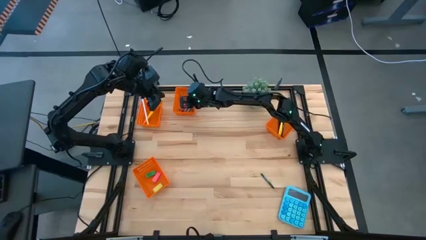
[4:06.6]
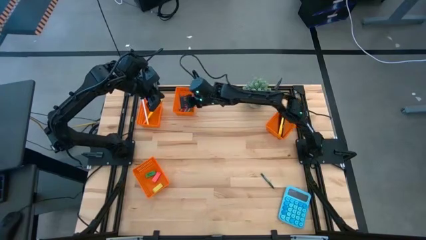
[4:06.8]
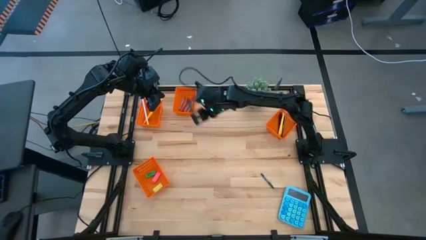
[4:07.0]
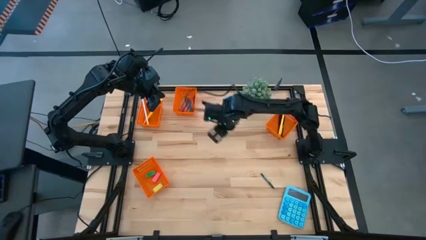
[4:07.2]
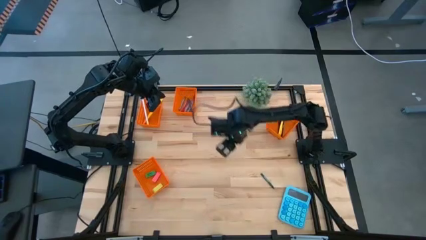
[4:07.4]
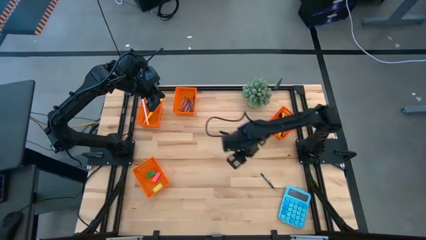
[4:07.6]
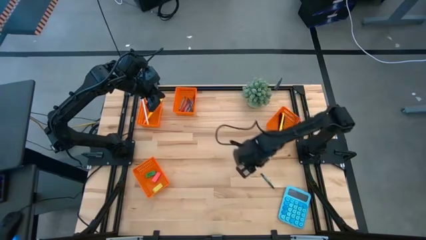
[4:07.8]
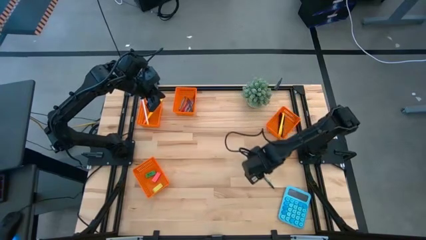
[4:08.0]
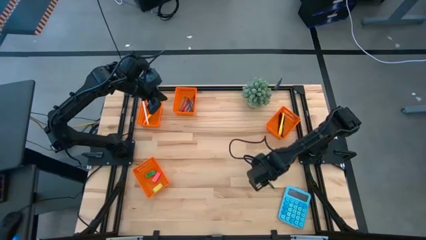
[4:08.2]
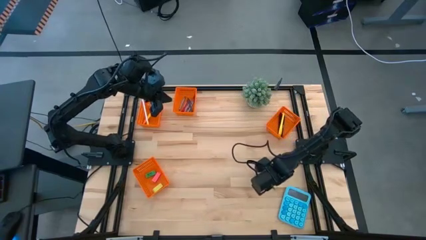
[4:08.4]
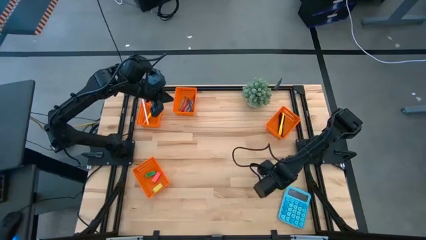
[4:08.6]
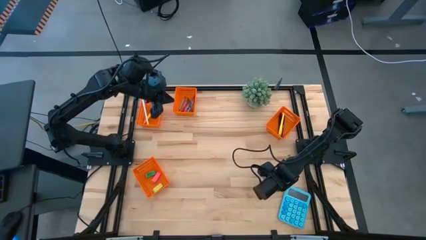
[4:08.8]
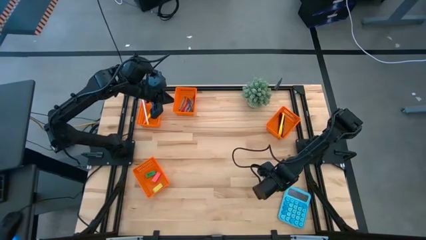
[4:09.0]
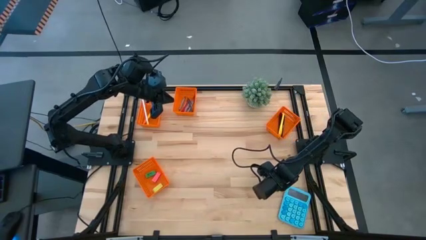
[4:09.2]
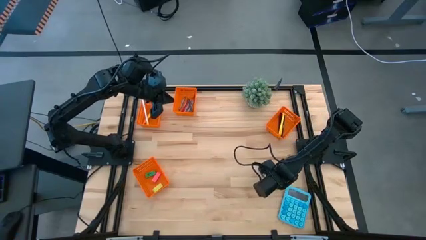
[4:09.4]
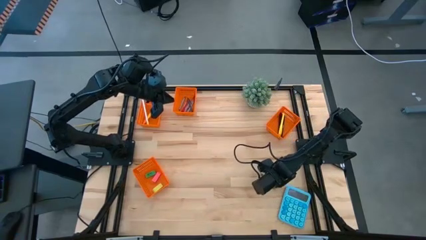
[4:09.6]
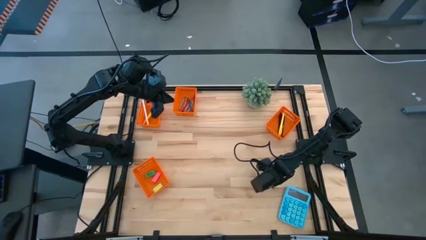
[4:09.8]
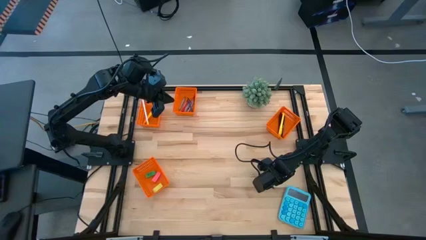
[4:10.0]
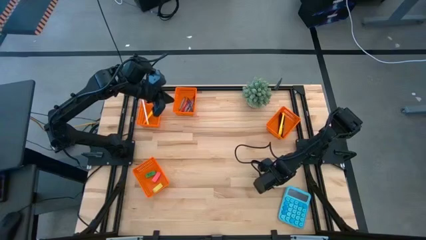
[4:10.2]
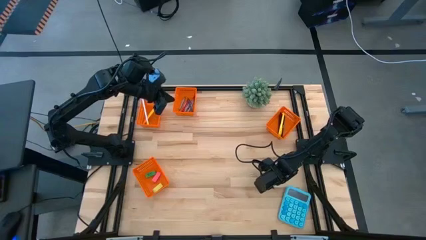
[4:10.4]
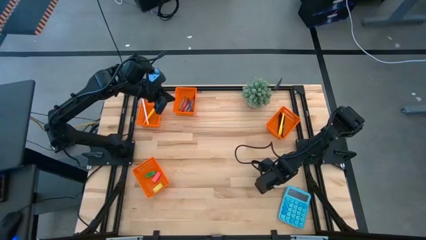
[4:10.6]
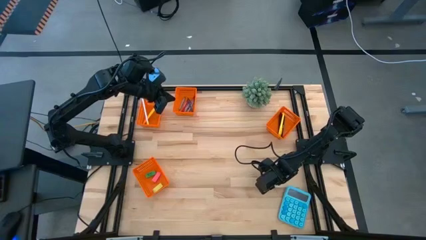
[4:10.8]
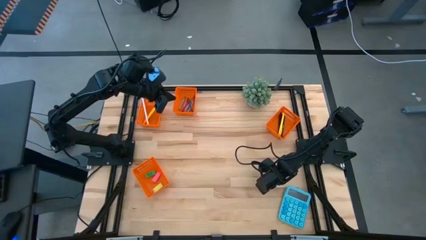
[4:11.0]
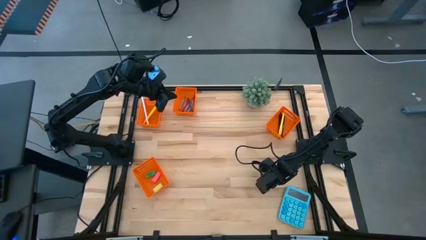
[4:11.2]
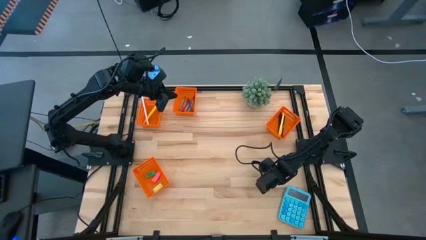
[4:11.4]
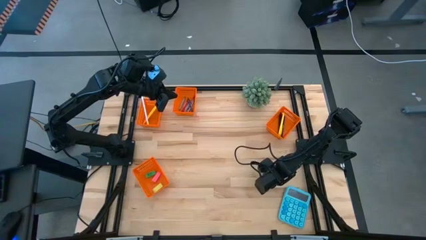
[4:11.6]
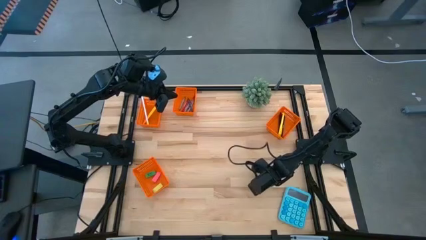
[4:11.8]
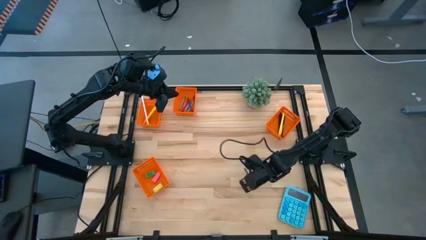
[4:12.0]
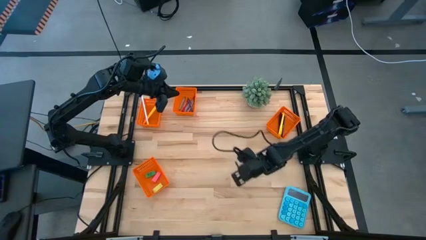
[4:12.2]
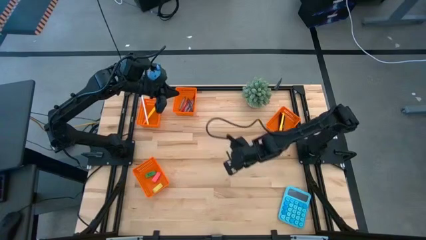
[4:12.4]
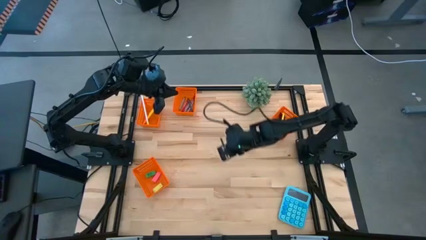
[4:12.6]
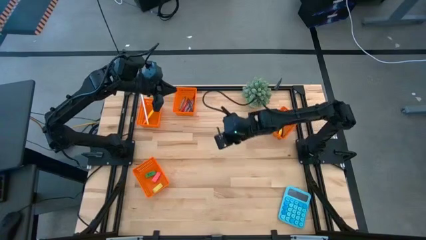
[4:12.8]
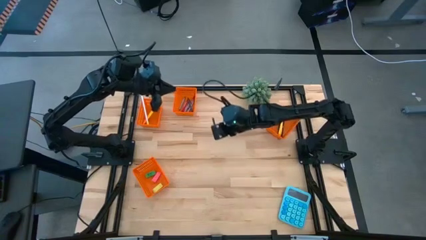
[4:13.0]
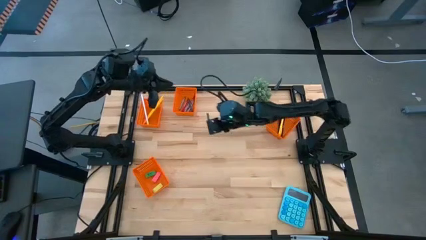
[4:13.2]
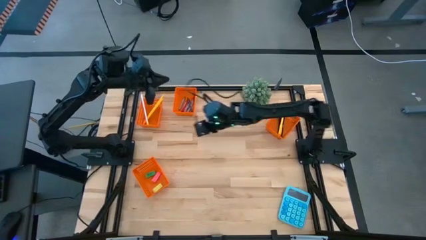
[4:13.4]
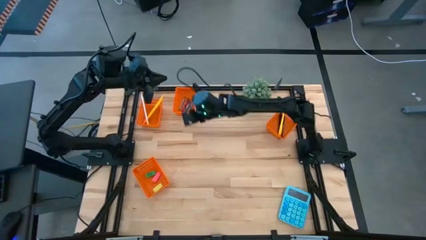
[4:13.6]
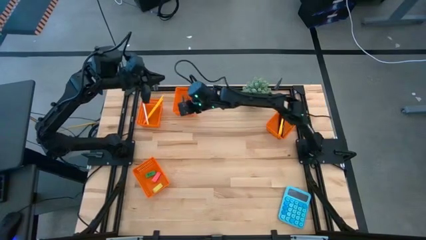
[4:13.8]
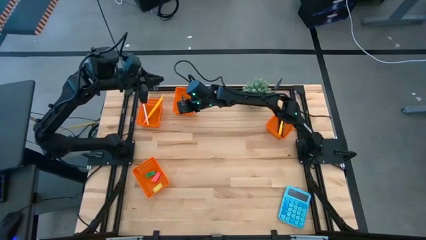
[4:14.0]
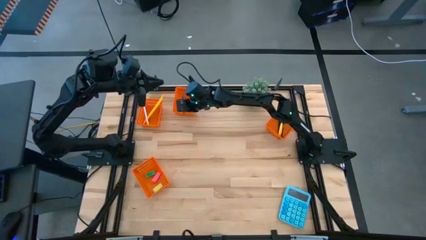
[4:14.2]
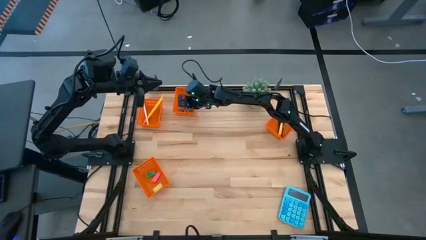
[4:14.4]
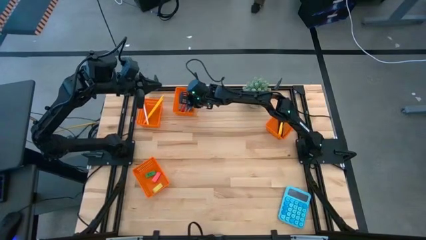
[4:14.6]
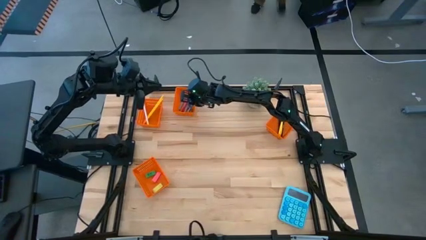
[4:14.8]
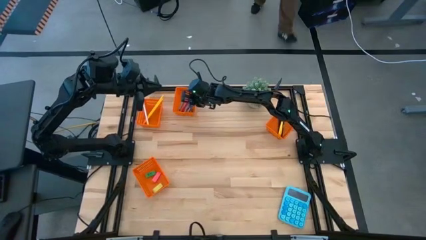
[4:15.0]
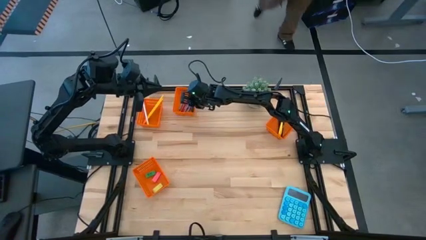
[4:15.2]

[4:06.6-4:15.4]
Task: Sort crayons/erasers/pens/pencils in bins
Put the green crayon into the middle orange bin

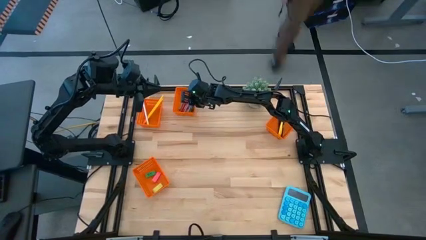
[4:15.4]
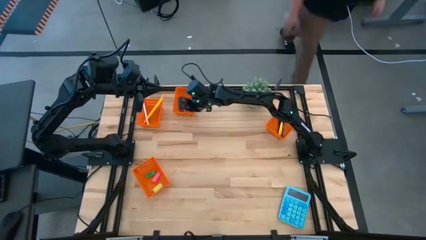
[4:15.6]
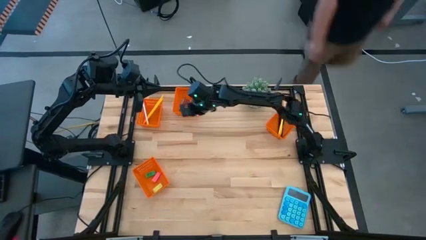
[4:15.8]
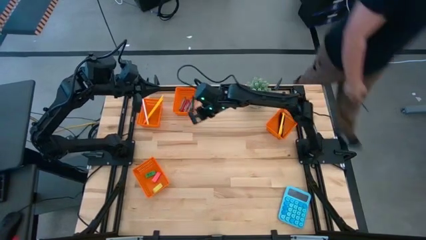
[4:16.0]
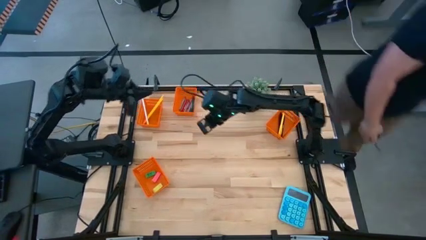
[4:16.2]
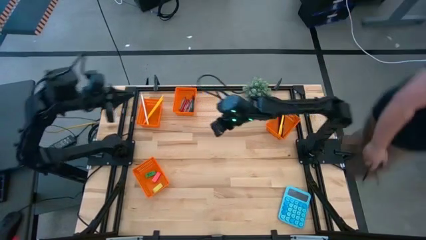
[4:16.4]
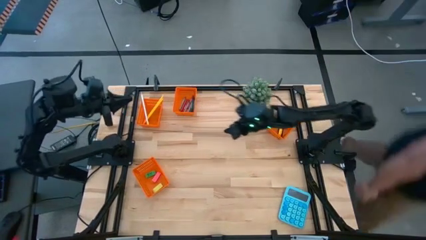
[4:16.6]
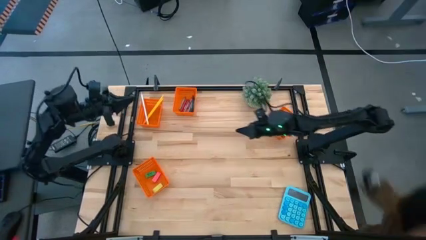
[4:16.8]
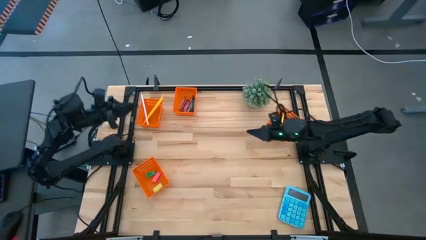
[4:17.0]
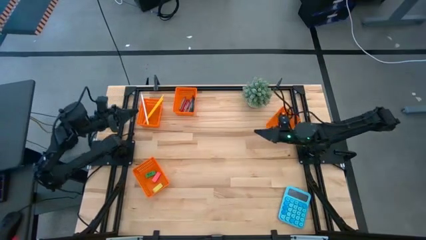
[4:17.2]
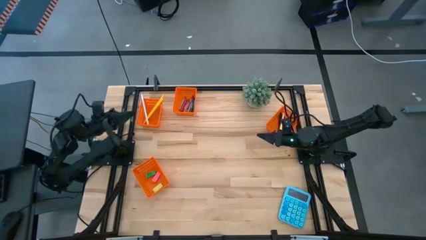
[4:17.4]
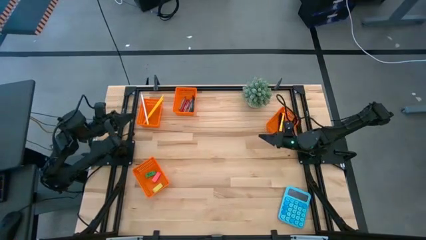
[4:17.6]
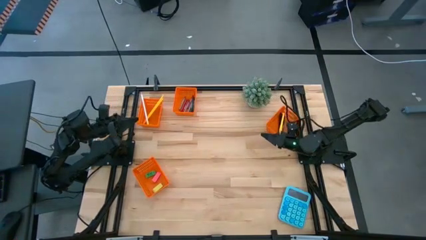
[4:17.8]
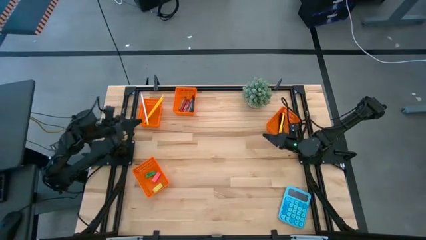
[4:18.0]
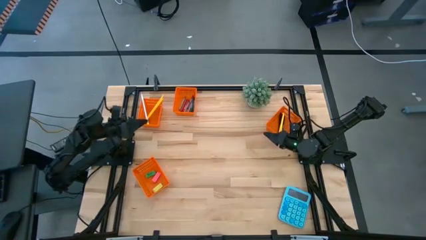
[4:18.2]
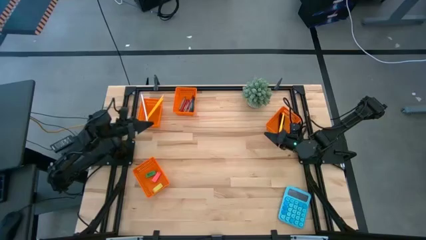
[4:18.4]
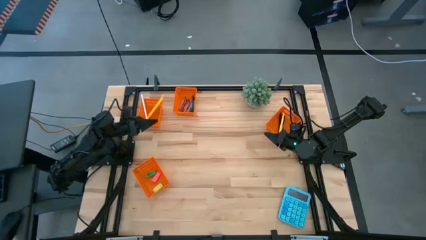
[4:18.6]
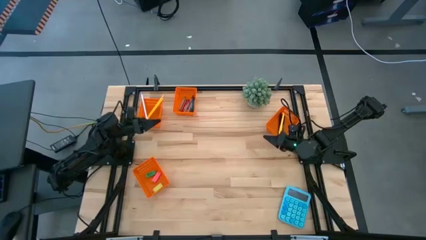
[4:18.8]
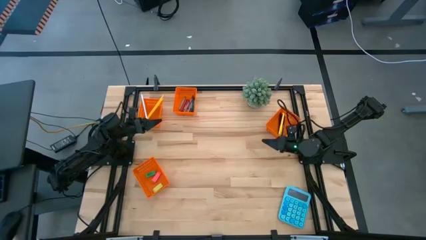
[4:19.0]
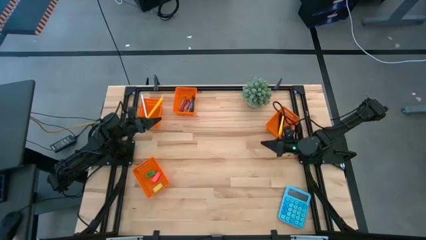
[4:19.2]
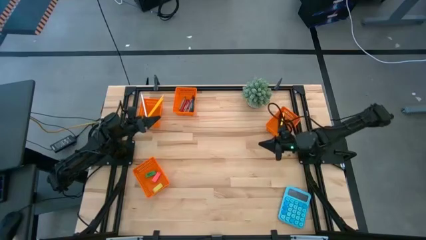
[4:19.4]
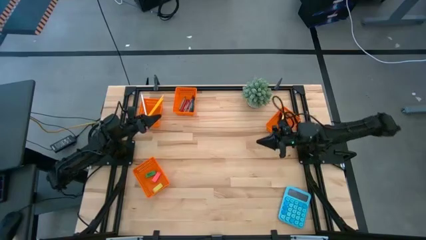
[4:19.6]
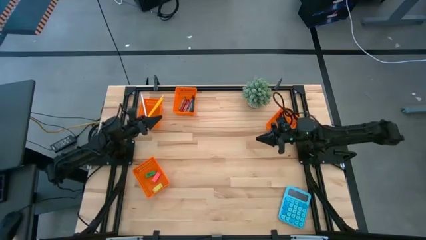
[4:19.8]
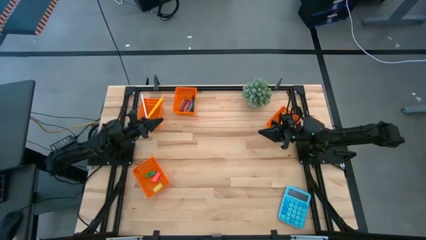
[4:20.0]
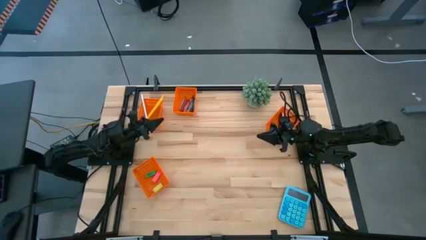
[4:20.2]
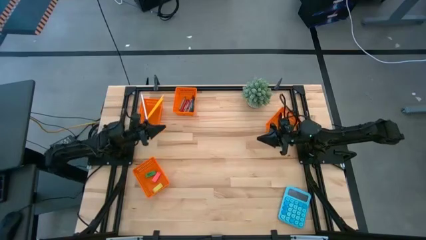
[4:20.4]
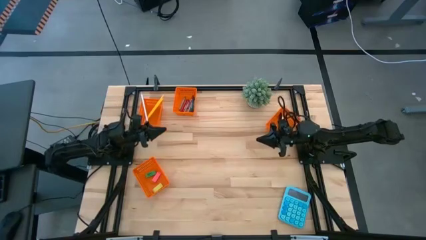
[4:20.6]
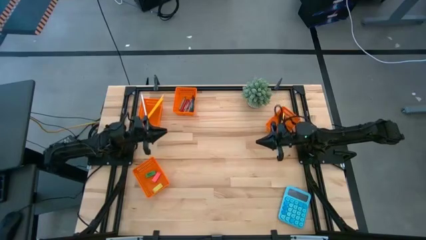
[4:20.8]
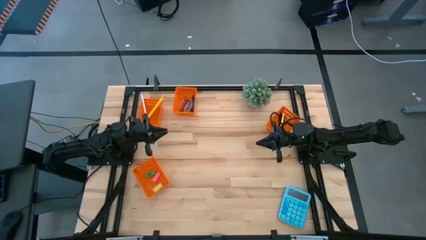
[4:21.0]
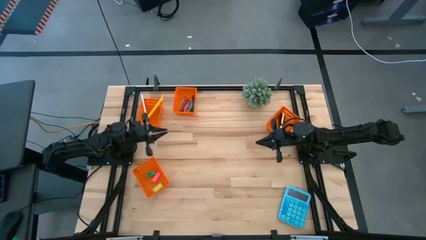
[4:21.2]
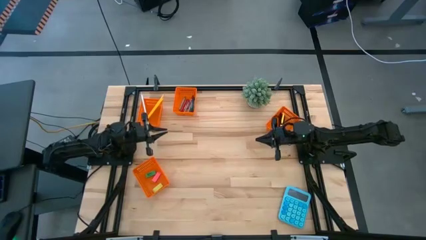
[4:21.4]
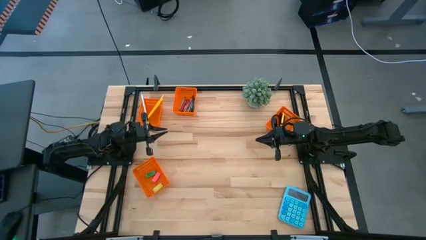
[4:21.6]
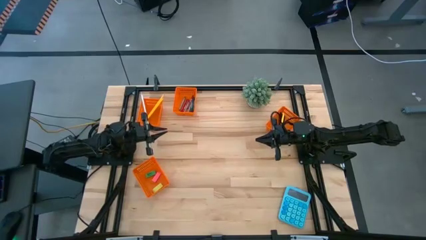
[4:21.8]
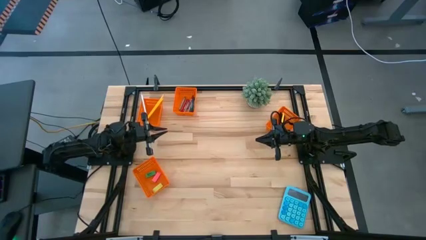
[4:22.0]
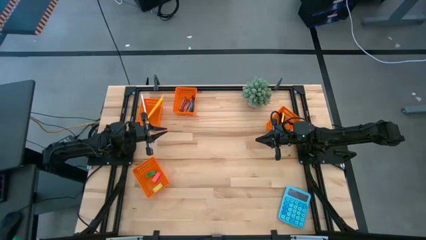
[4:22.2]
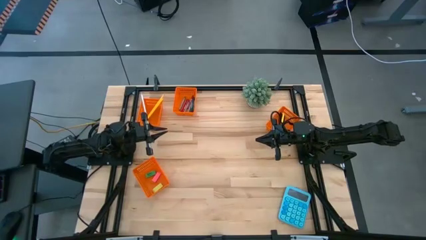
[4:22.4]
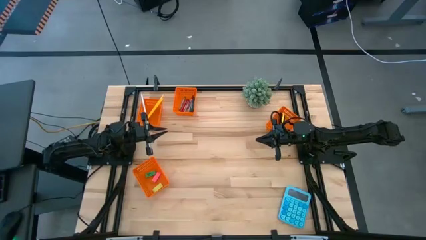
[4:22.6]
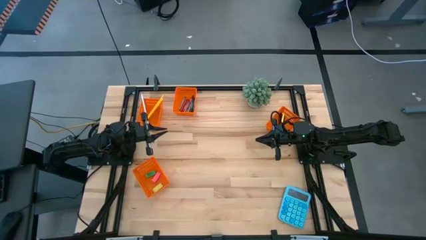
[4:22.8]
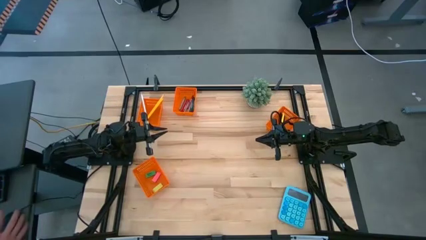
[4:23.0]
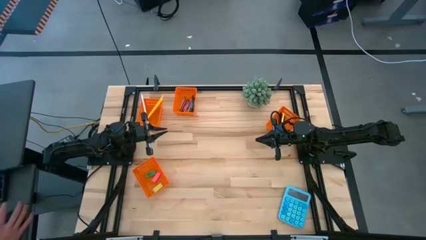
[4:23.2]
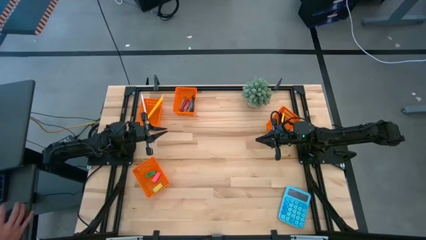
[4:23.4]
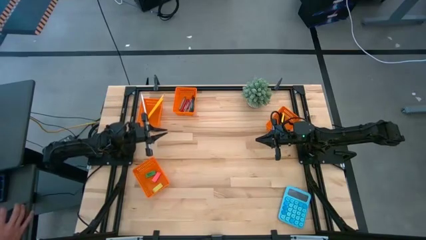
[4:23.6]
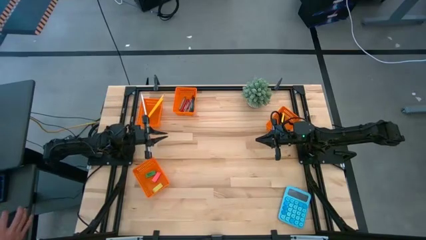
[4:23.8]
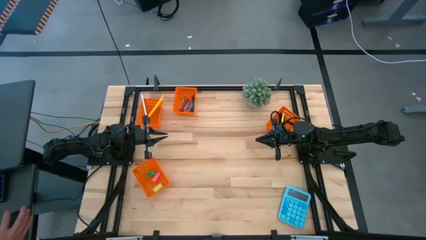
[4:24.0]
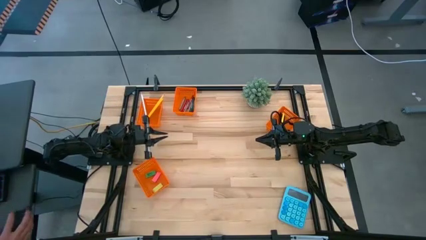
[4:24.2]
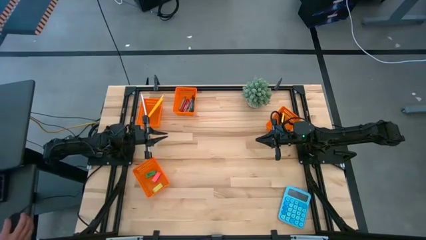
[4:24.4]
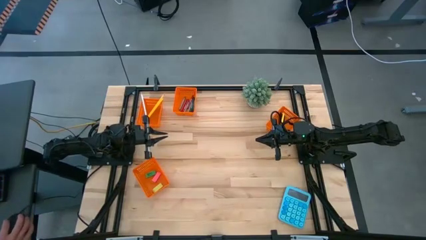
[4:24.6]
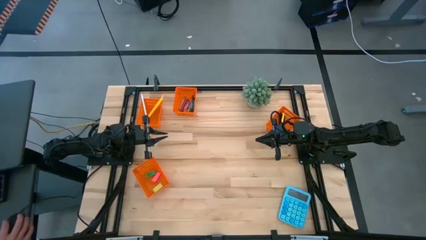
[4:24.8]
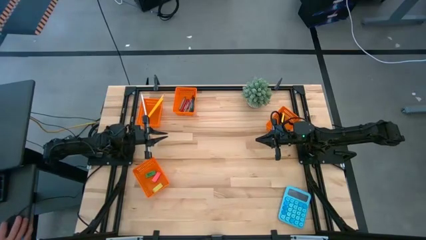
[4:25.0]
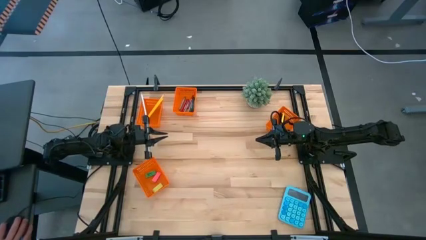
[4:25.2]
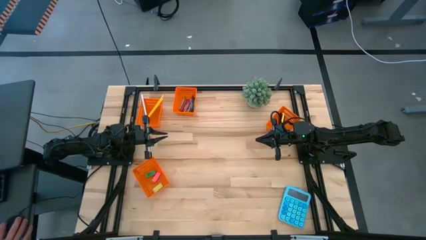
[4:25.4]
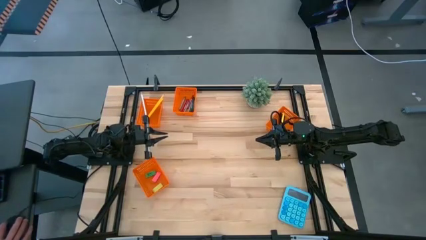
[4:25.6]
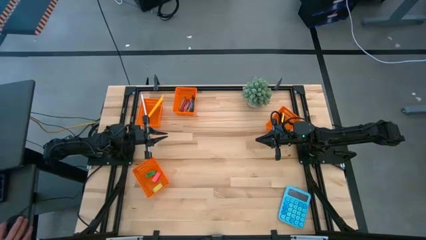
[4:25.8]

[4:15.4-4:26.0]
Return to Home Position
